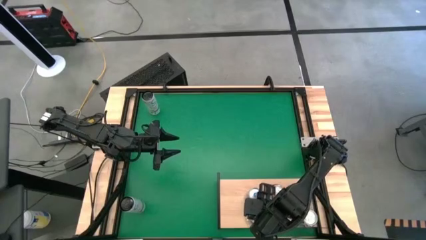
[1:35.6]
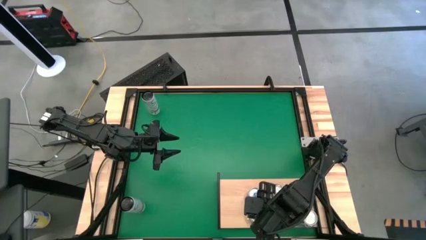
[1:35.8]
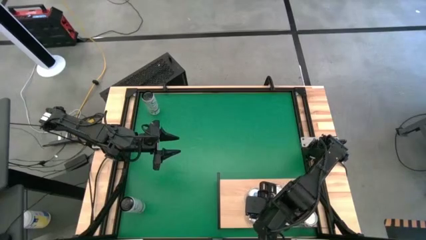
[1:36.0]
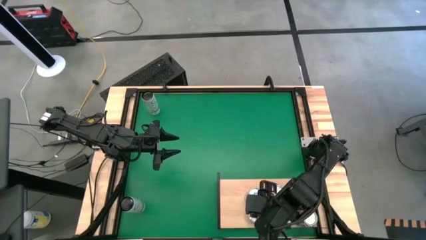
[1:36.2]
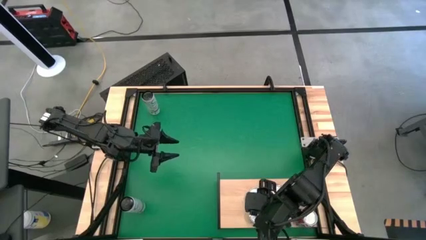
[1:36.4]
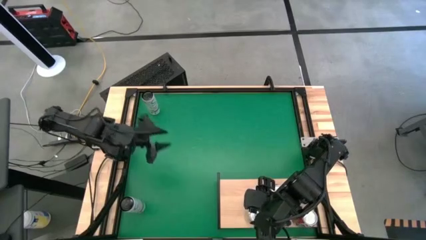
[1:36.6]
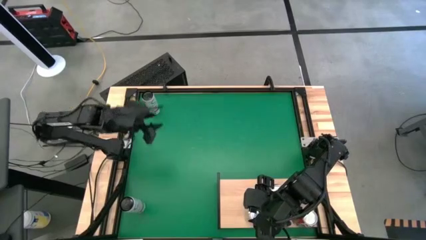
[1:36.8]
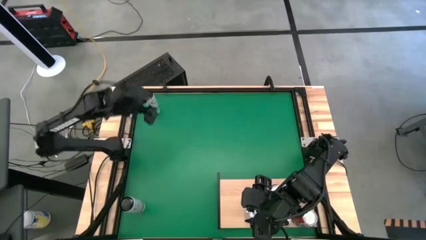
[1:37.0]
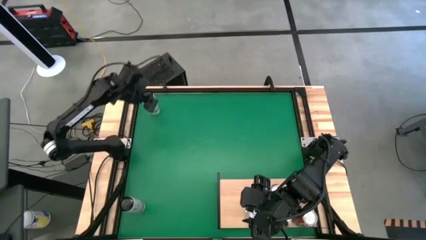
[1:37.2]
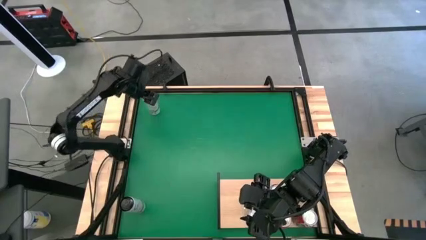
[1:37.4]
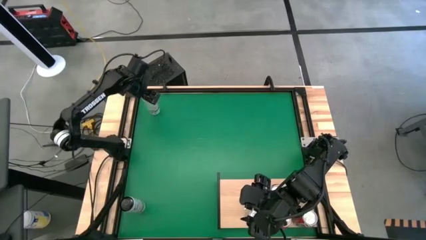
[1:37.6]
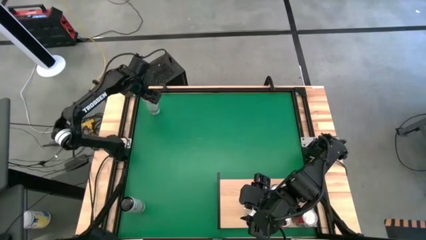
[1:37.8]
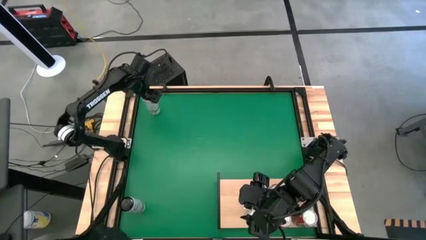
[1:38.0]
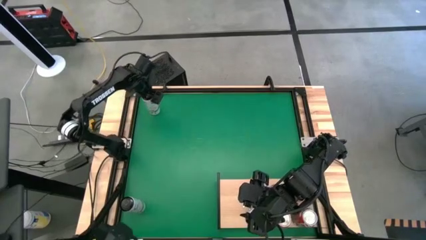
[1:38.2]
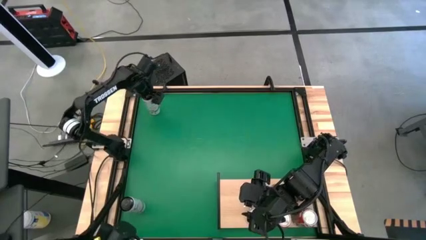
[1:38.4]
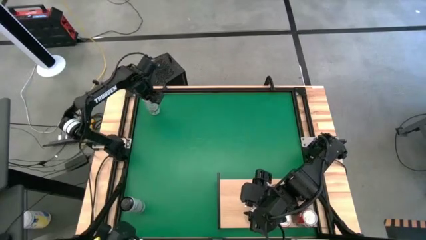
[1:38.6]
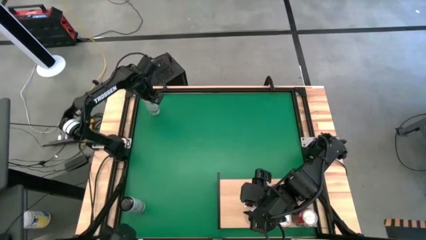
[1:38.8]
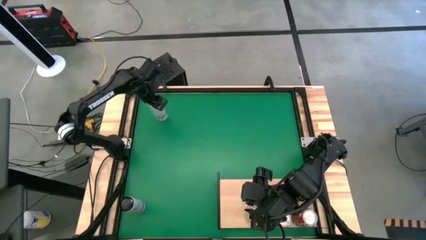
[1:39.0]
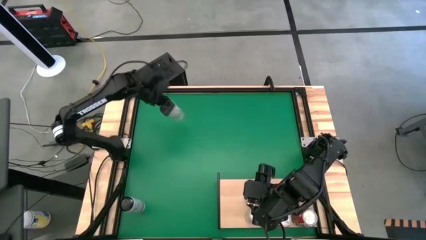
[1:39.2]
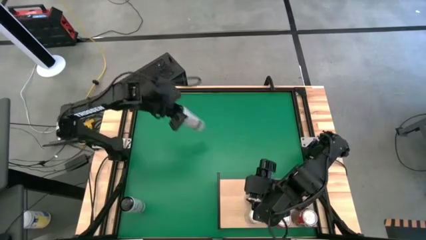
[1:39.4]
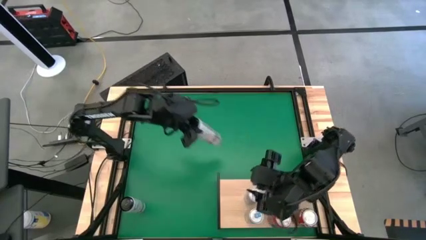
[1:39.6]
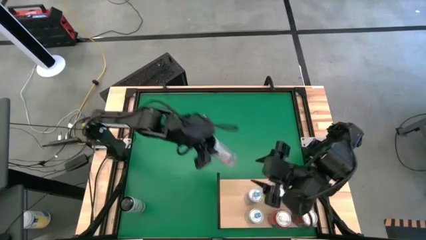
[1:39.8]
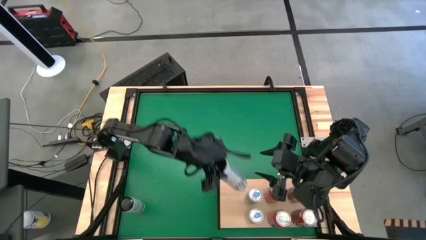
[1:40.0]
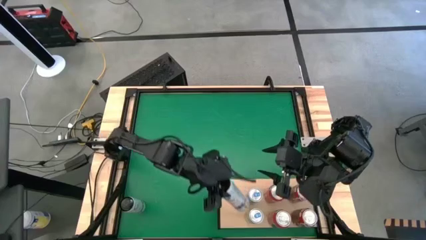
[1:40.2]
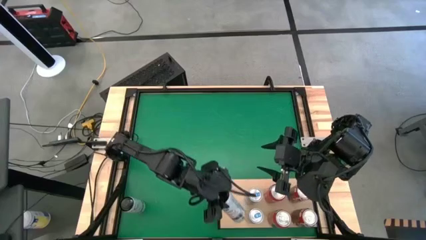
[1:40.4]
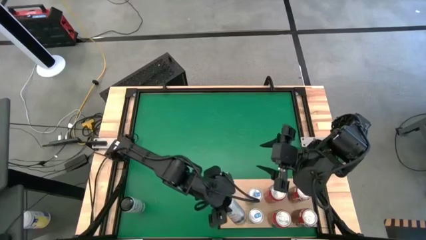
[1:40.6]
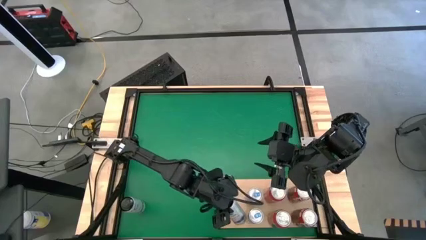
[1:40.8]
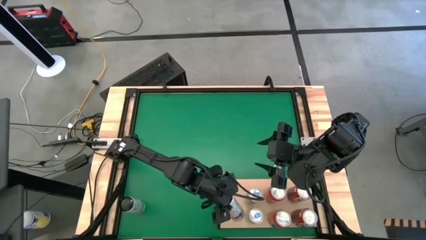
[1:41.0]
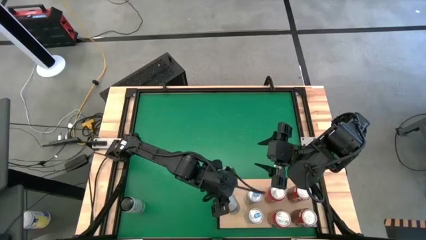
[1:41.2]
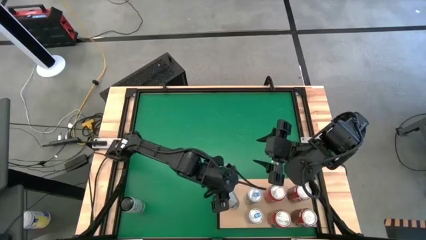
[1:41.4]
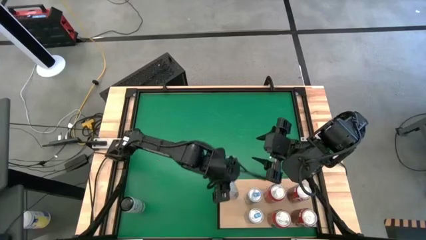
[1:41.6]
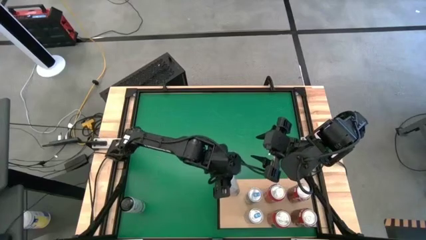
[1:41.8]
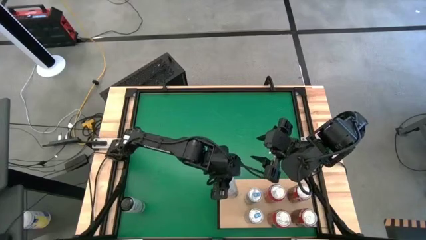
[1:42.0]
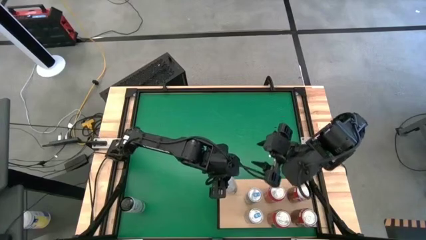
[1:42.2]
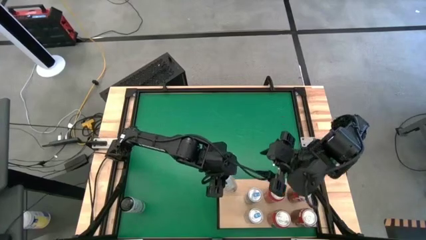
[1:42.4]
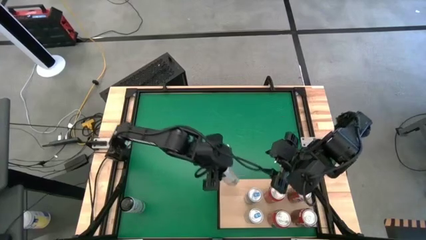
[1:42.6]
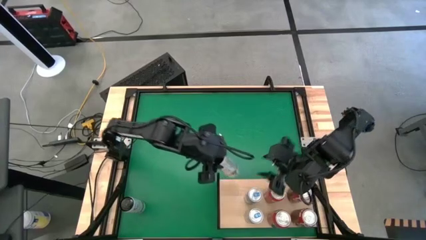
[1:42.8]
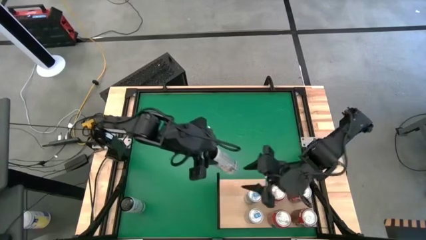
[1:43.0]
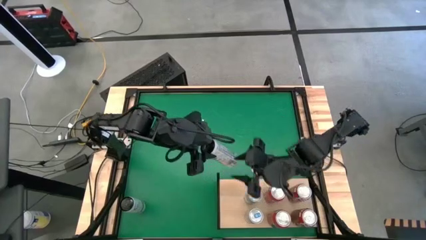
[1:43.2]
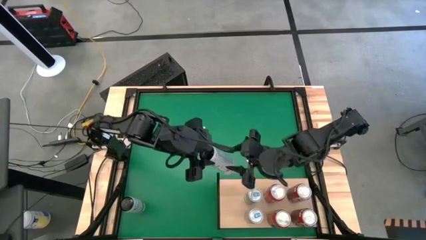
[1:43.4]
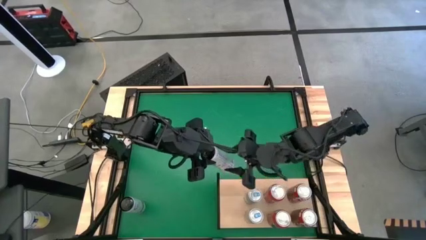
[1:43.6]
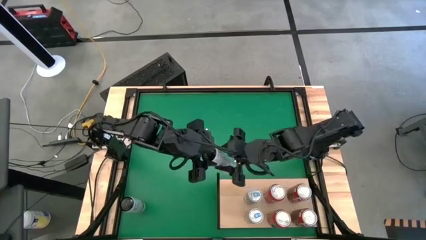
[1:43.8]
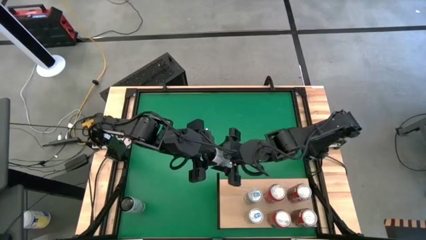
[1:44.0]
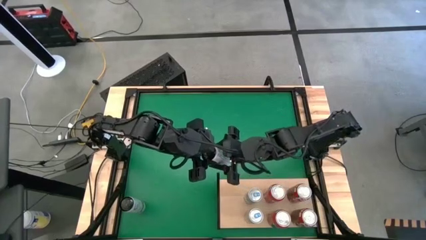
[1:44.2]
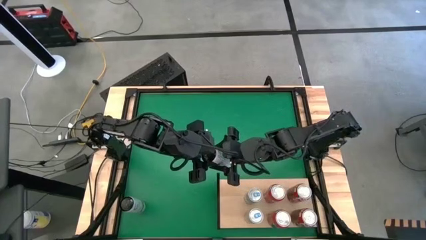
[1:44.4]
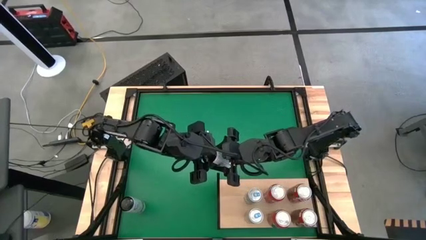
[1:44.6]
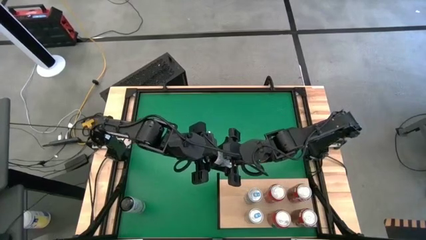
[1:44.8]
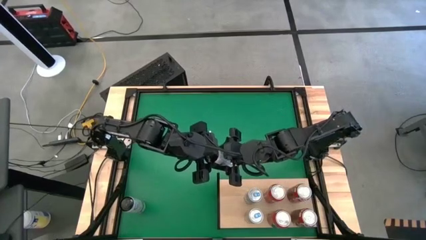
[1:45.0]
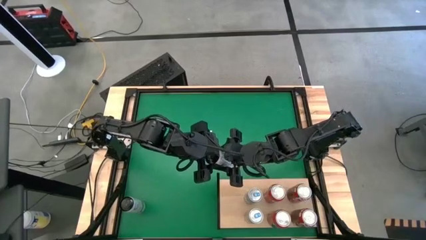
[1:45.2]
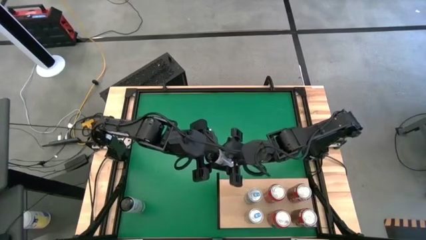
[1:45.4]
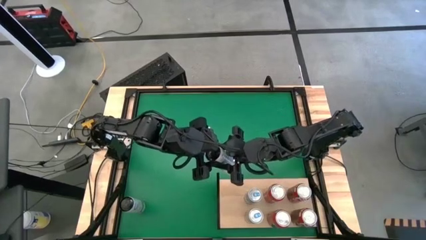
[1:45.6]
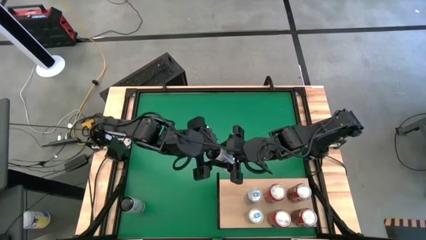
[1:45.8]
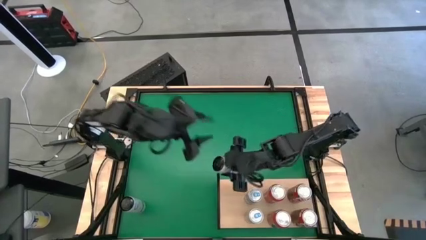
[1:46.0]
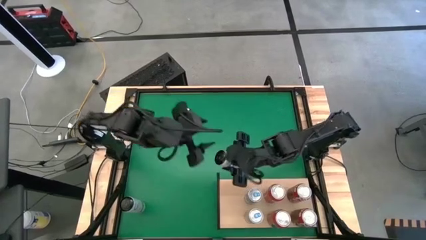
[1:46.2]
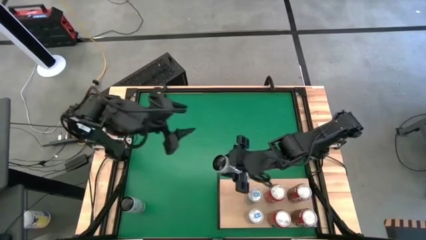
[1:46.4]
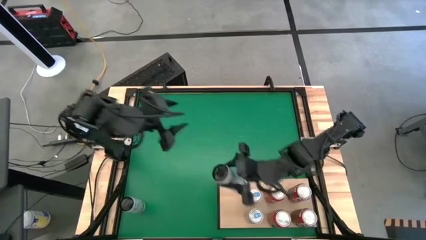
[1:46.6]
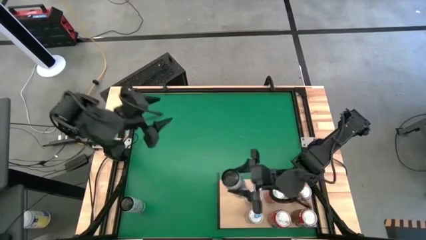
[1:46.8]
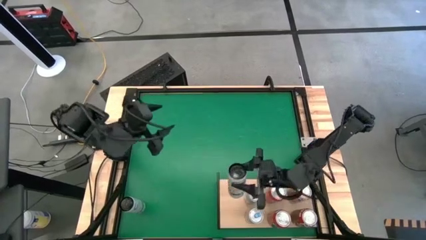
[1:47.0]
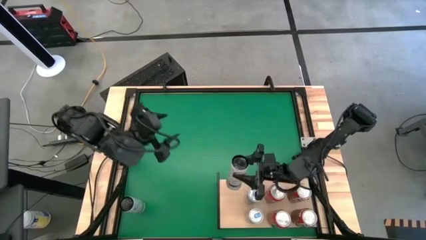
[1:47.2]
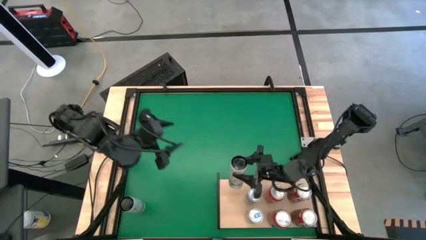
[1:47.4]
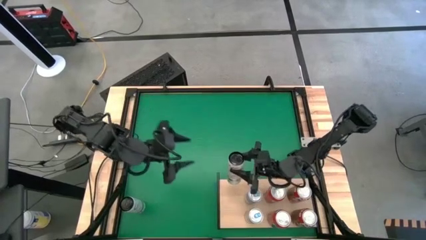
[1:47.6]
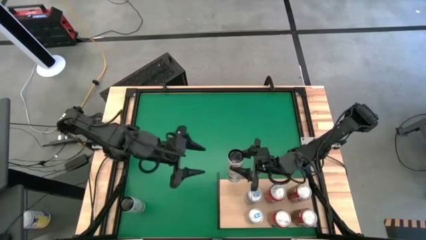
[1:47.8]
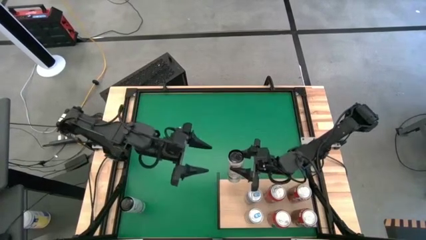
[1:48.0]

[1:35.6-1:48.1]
Task: Place canned beverage on shelf
Put the top white yellow soda can on the shelf
